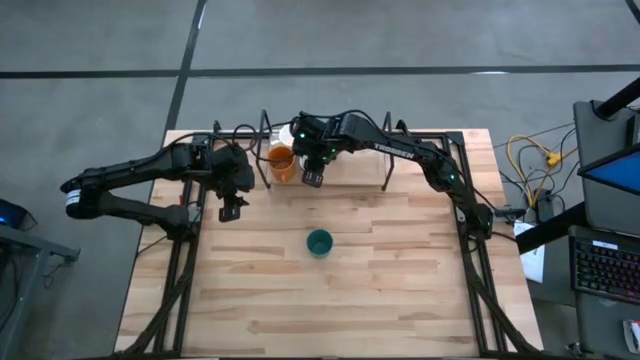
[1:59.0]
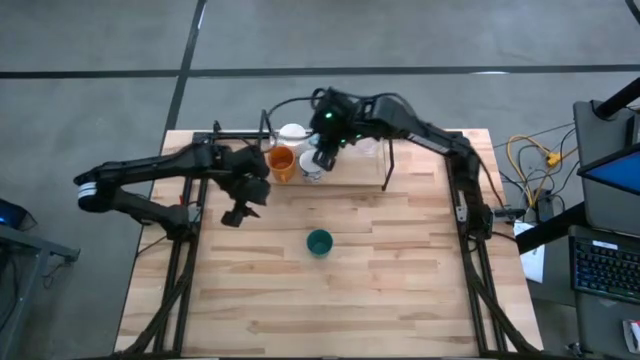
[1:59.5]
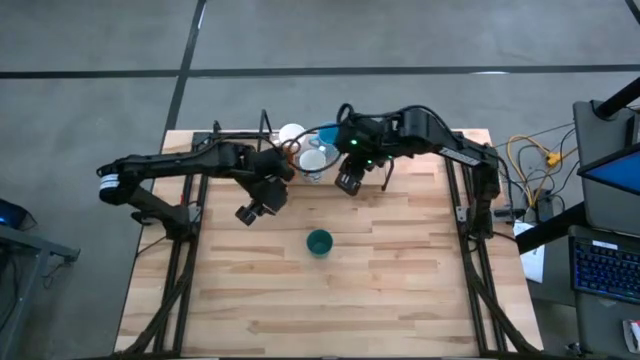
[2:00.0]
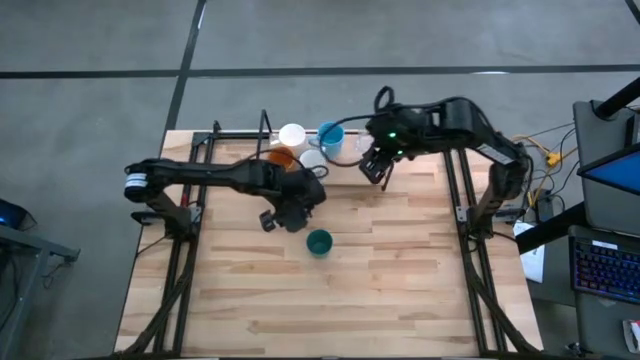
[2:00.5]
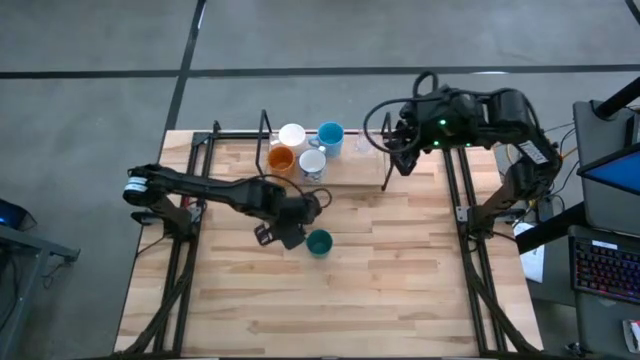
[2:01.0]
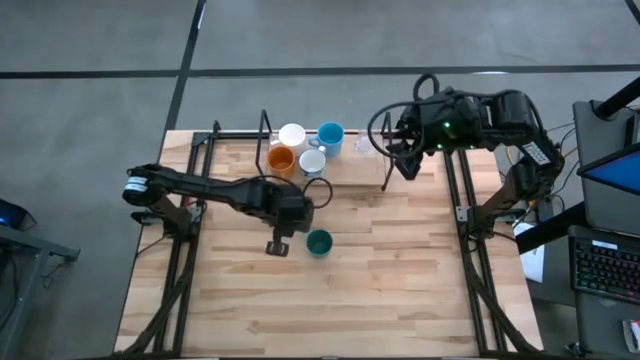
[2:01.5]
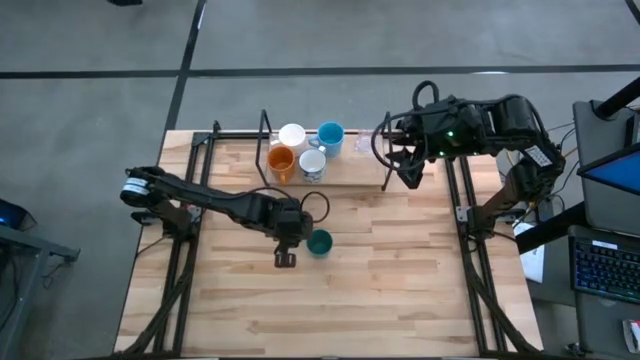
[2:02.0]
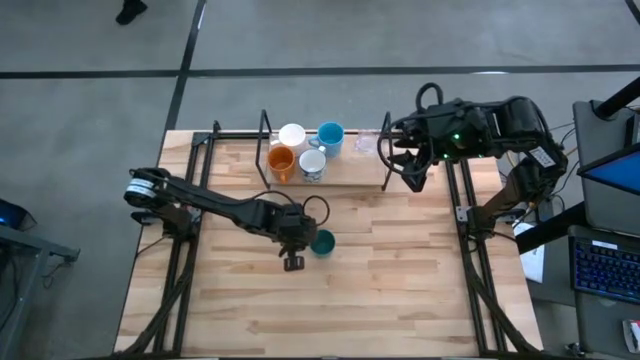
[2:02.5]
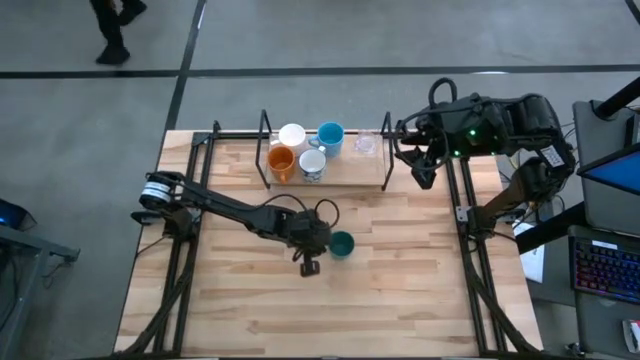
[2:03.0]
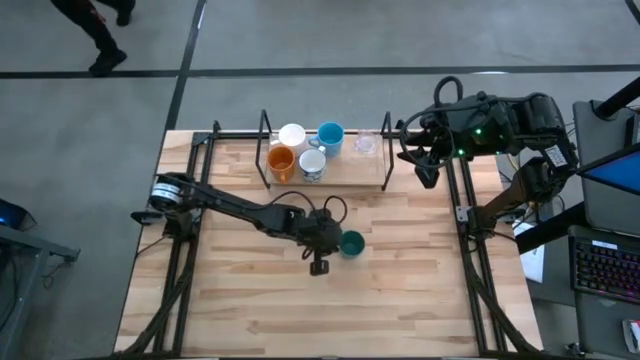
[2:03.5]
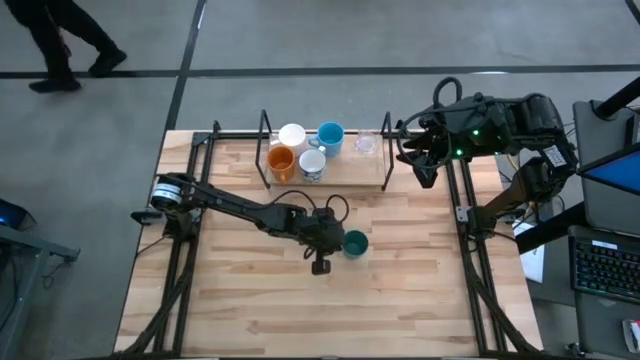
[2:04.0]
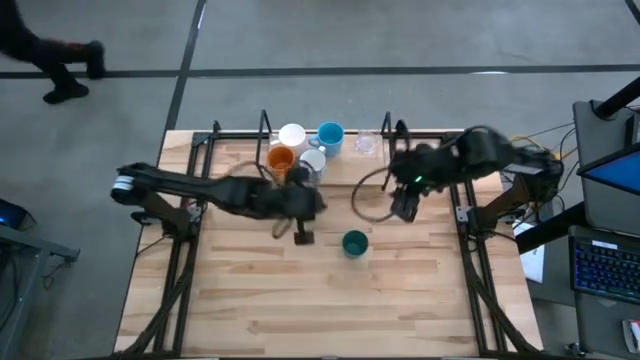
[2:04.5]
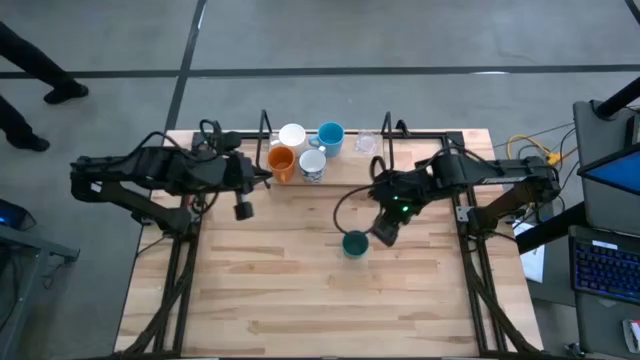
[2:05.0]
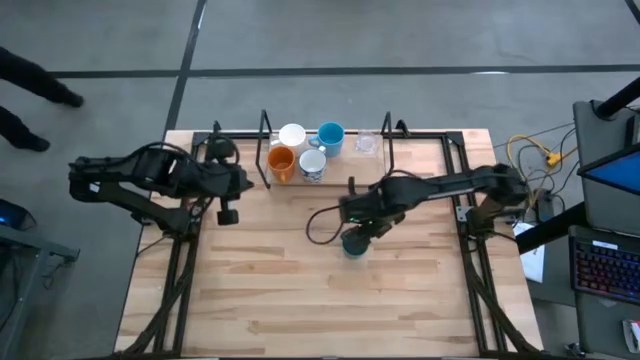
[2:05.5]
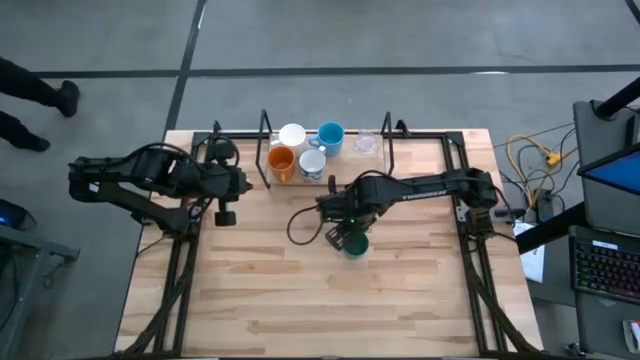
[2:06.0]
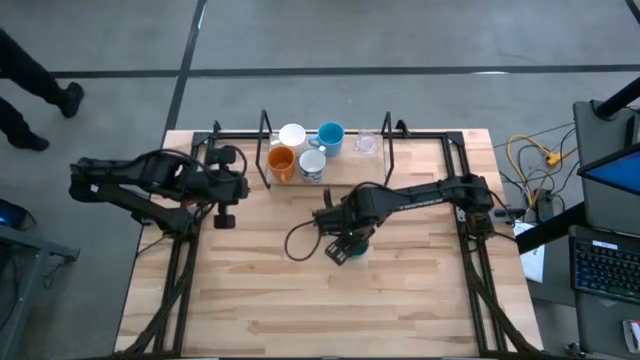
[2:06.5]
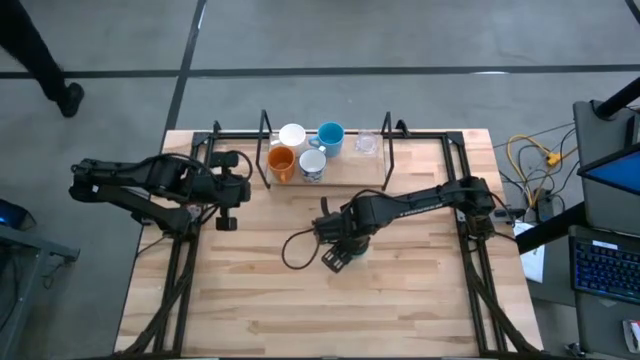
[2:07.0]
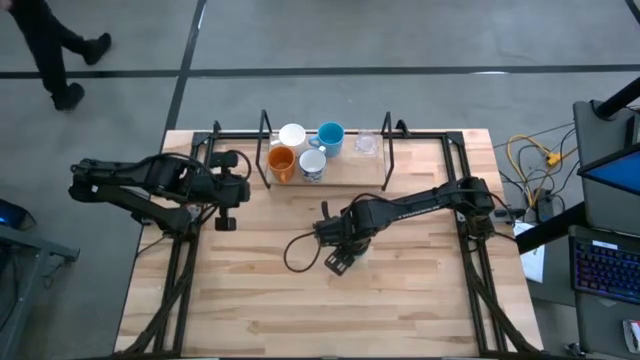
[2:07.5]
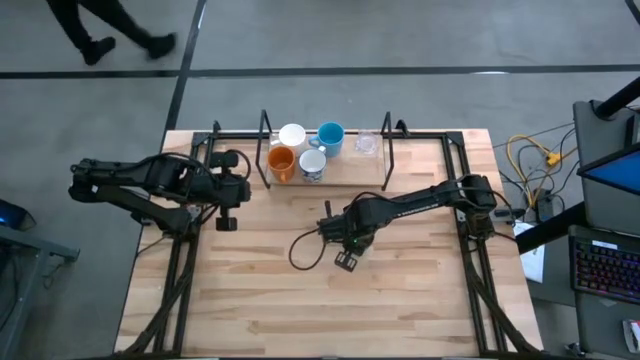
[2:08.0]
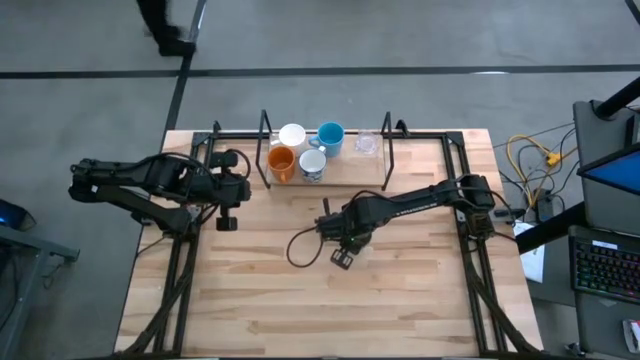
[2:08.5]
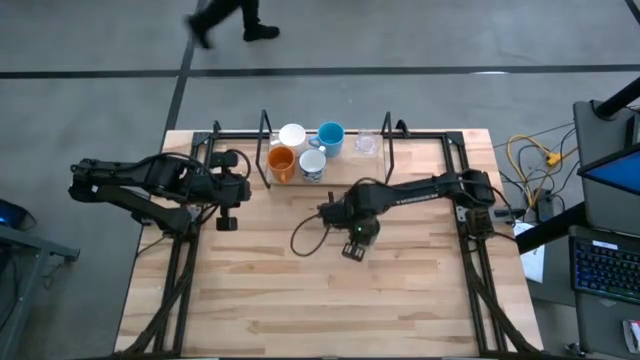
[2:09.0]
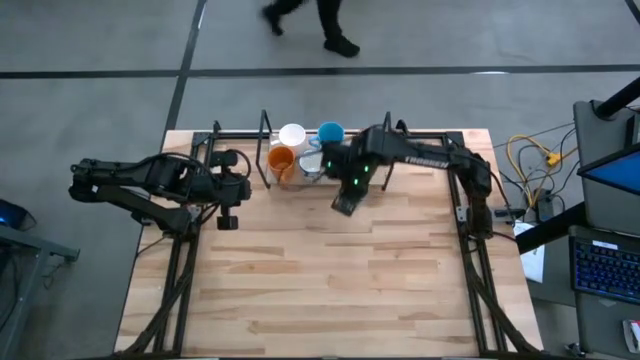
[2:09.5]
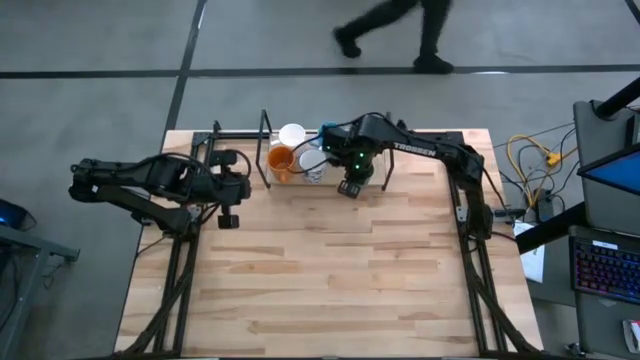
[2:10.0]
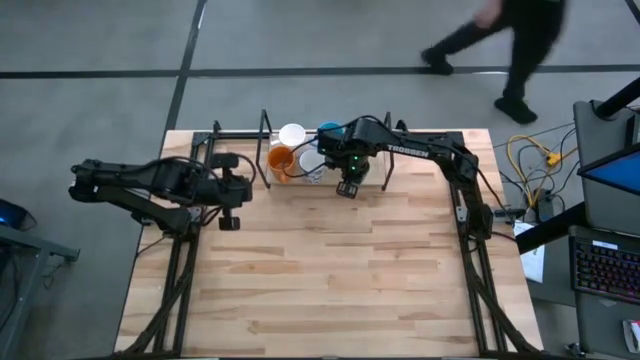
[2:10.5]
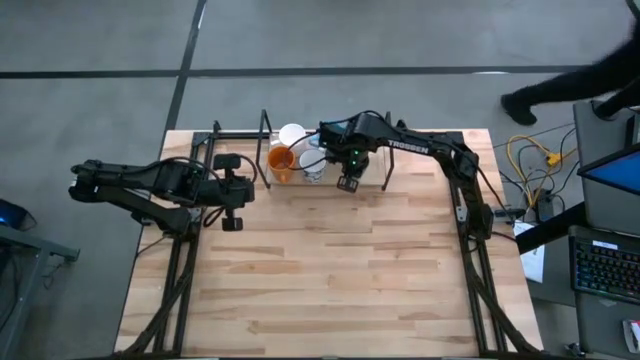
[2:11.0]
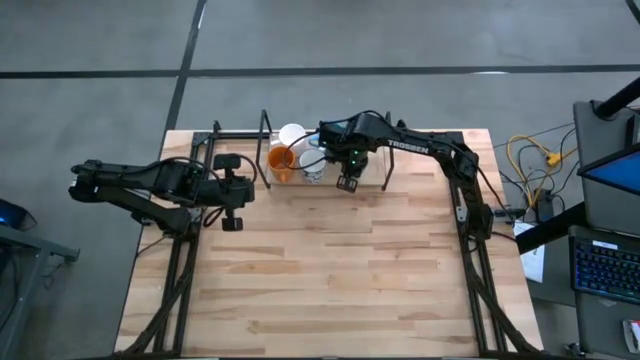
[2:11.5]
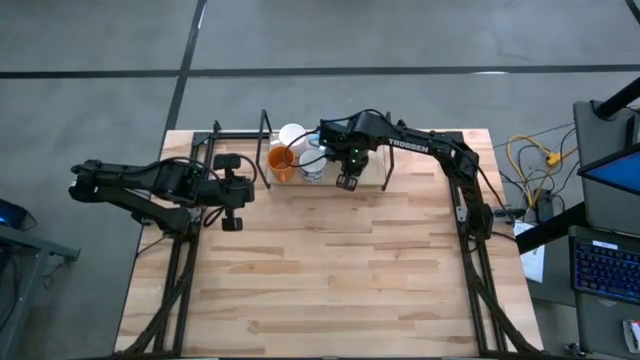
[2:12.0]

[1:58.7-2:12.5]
Task: Stack small to large cups/mugs on shelf
Put the green cup on the shelf

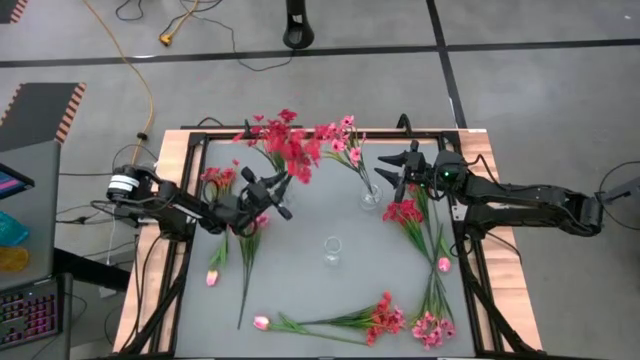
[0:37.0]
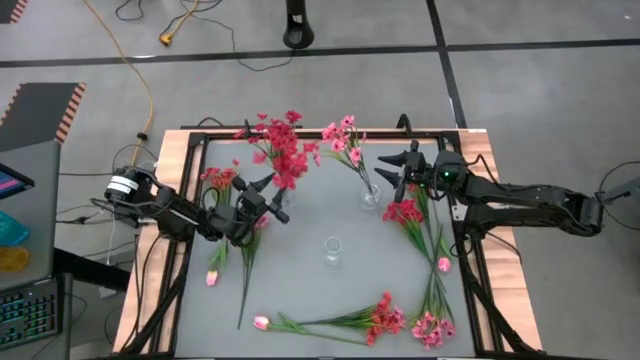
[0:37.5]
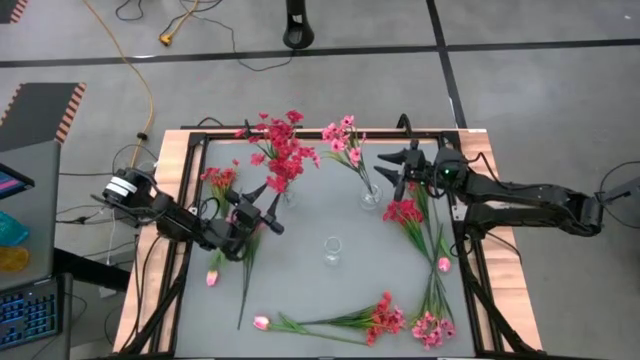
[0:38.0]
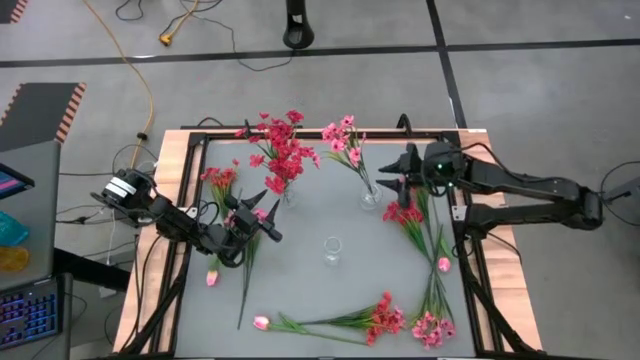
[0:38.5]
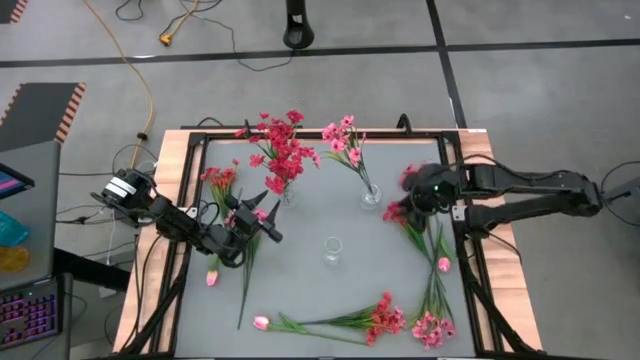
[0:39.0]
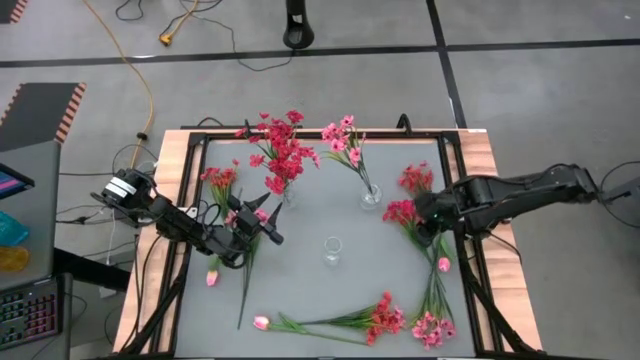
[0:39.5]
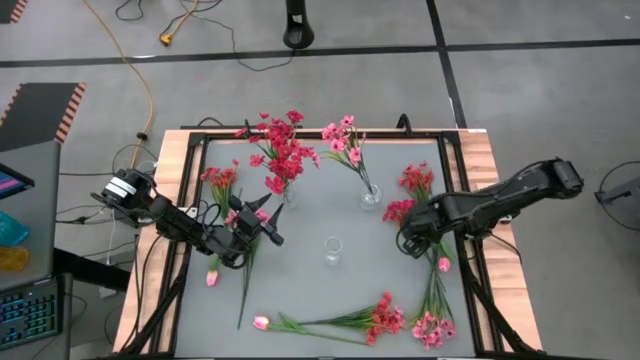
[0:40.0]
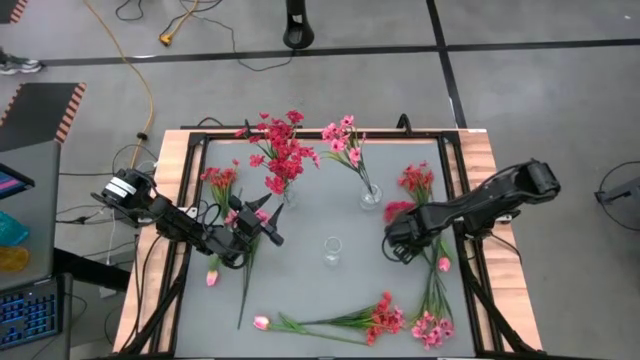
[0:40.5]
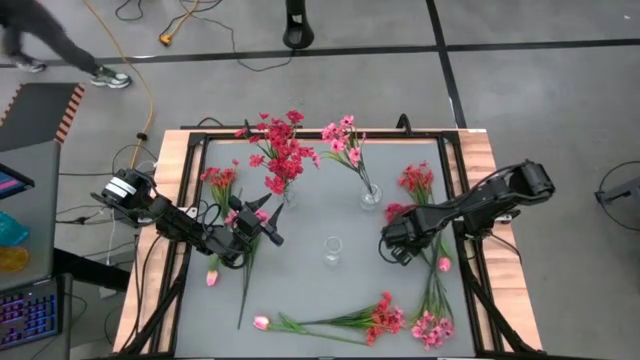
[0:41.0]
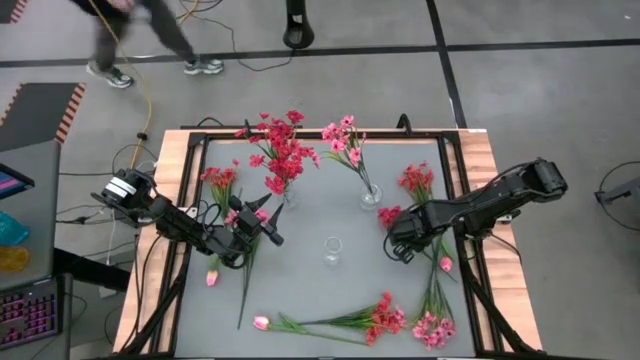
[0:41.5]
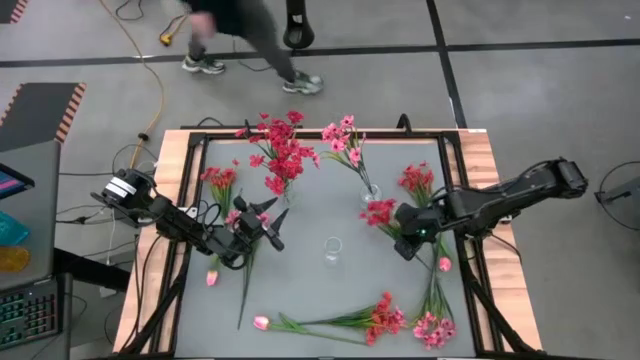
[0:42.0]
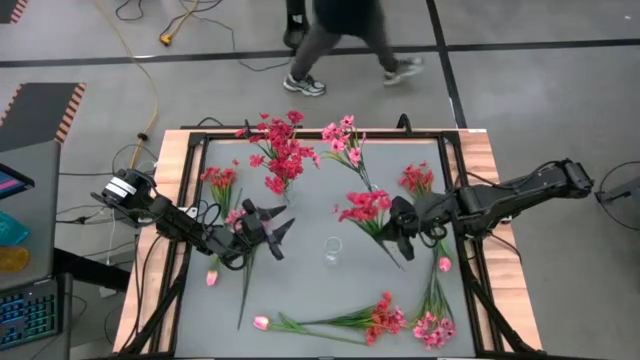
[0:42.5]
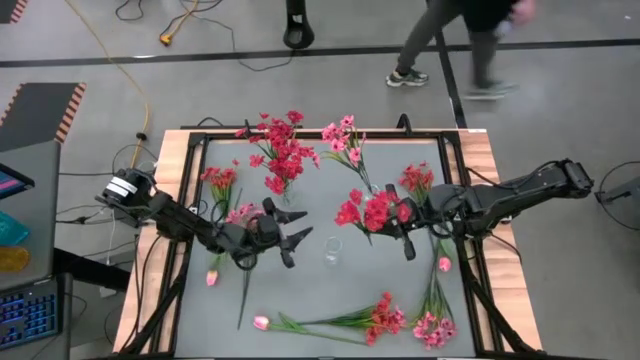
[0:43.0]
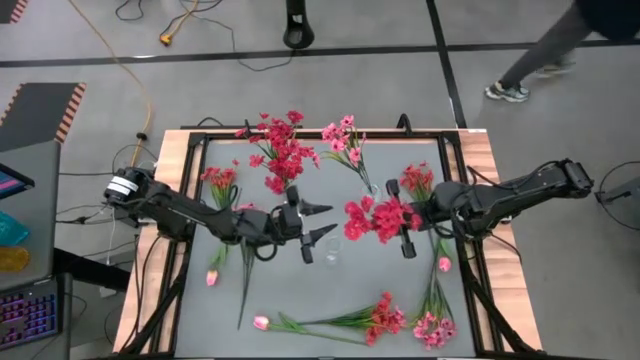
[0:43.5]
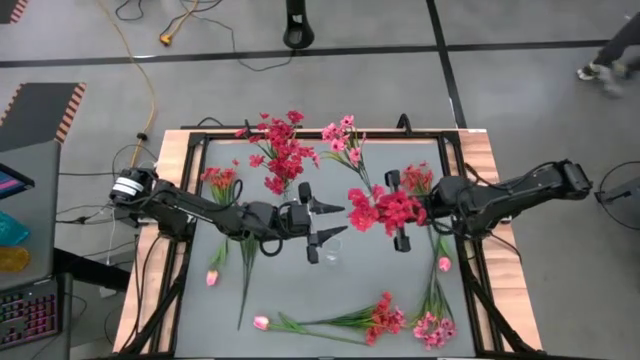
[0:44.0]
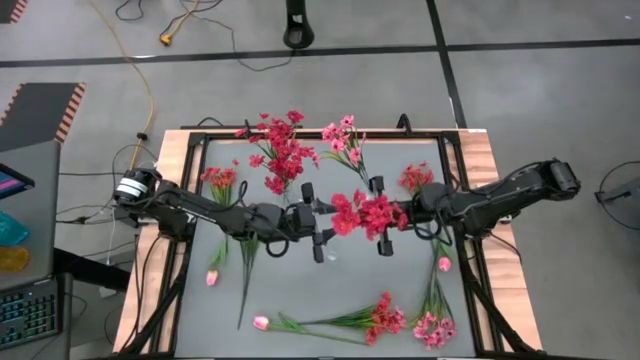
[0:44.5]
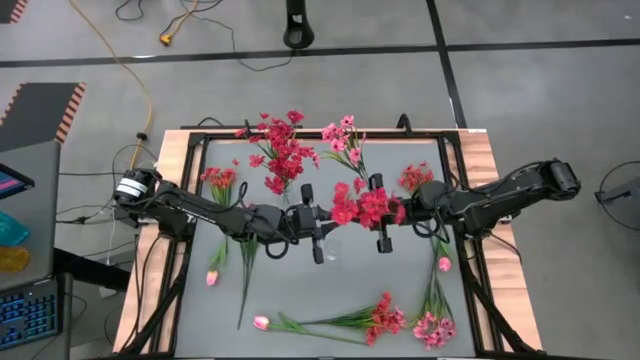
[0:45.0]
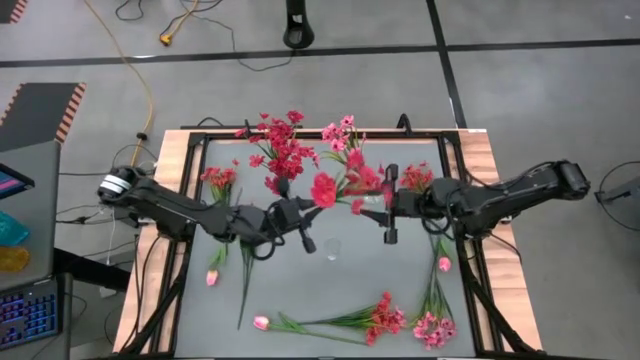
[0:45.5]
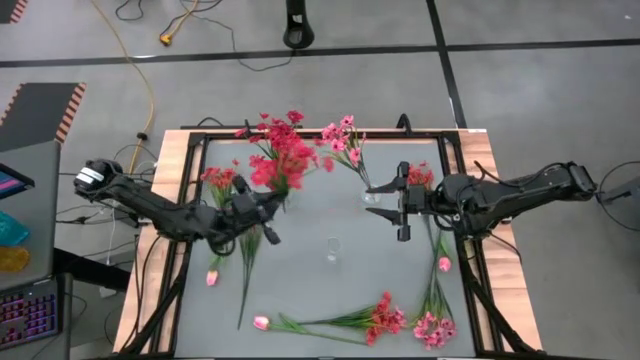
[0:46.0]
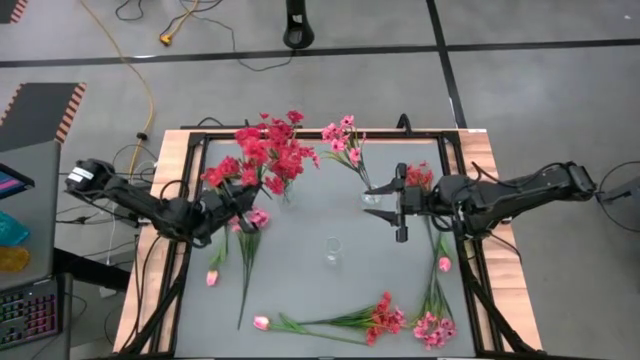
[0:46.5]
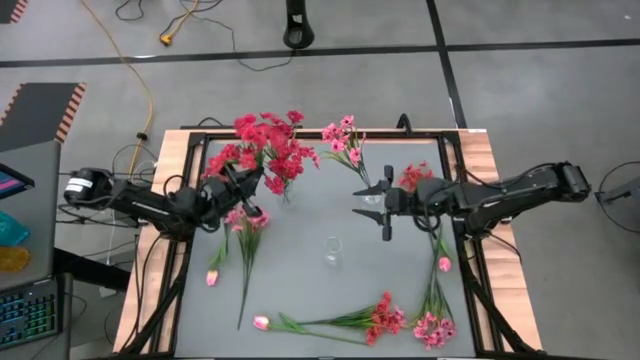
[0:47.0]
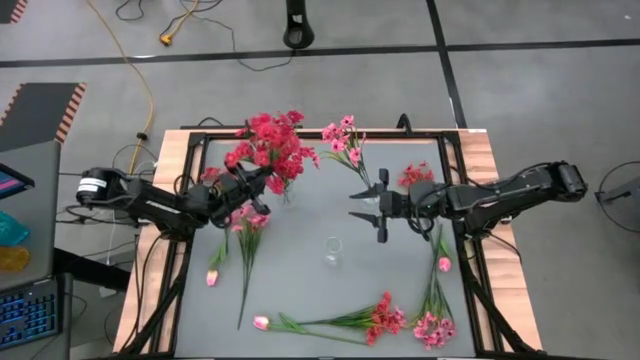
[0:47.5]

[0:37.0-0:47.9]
Task: Sort flowers into vase by color
Put the red flowers into the top left transparent vase
